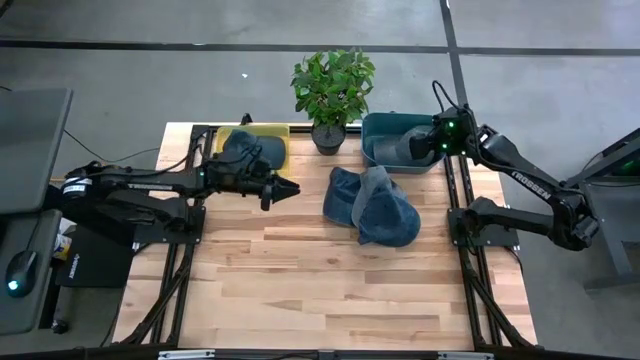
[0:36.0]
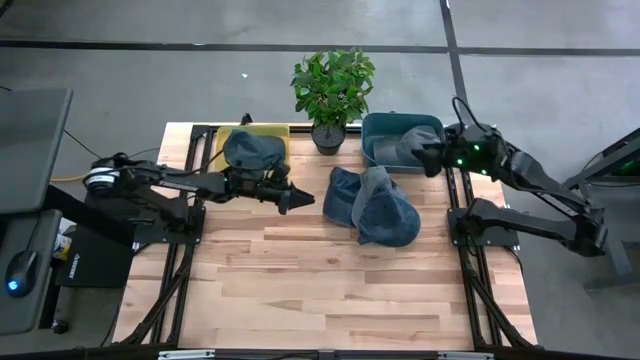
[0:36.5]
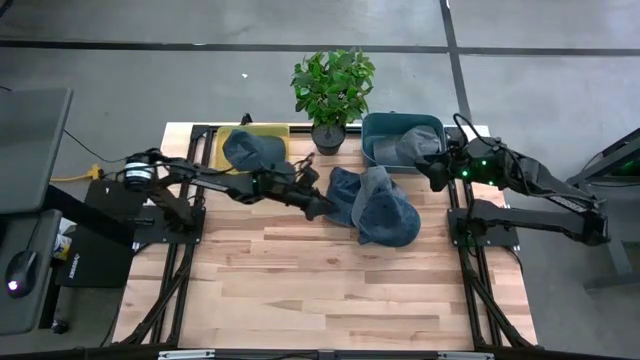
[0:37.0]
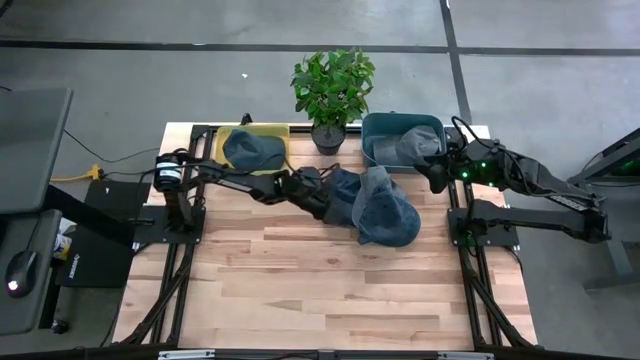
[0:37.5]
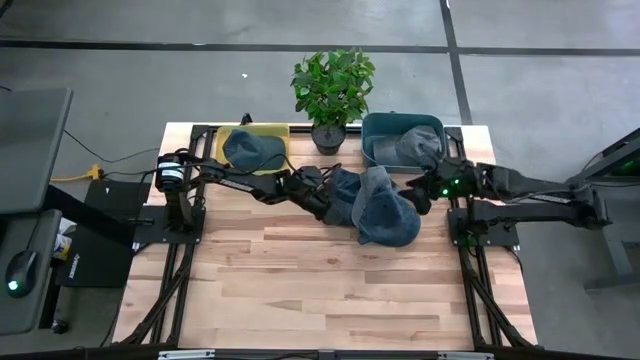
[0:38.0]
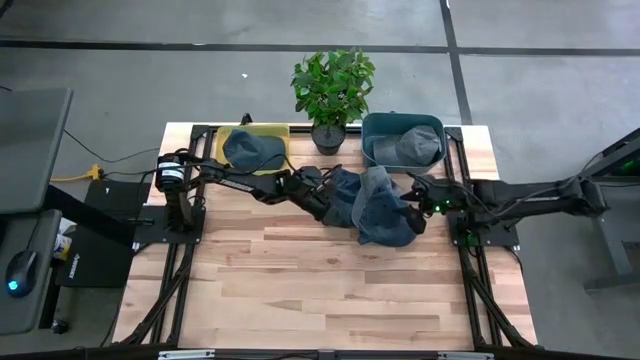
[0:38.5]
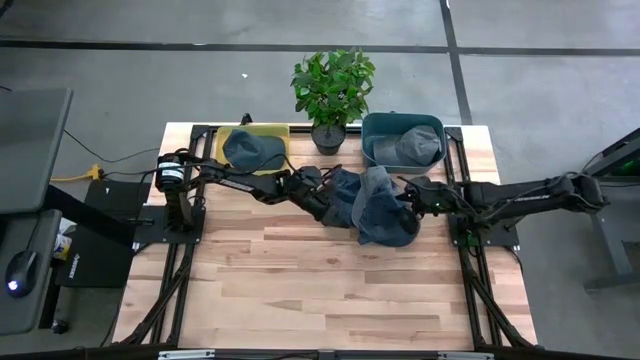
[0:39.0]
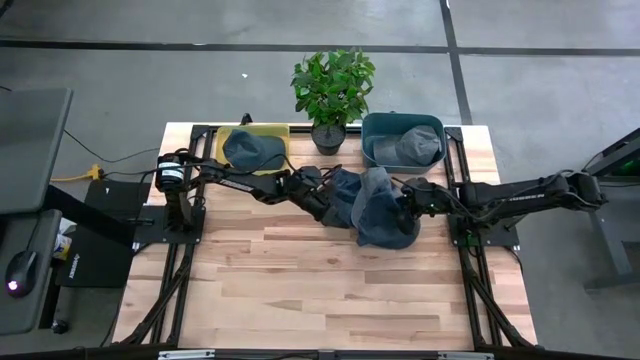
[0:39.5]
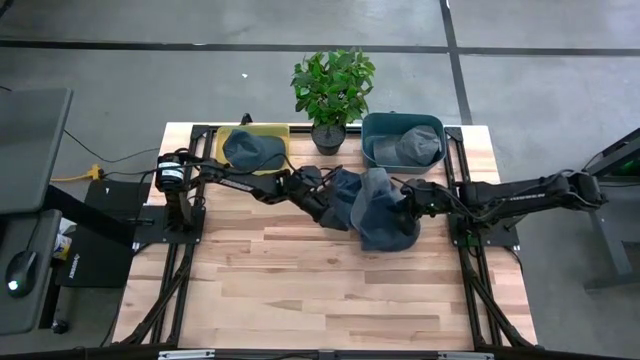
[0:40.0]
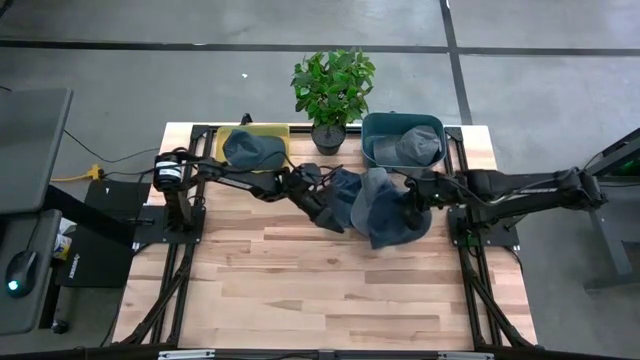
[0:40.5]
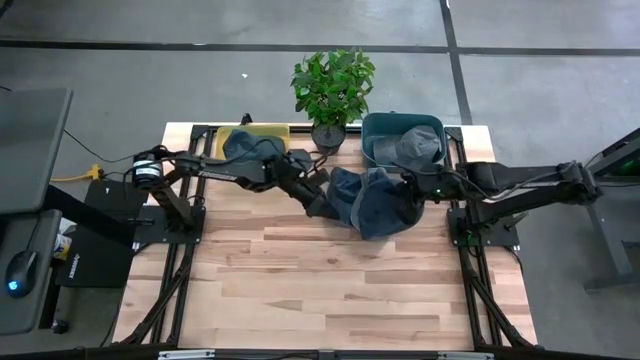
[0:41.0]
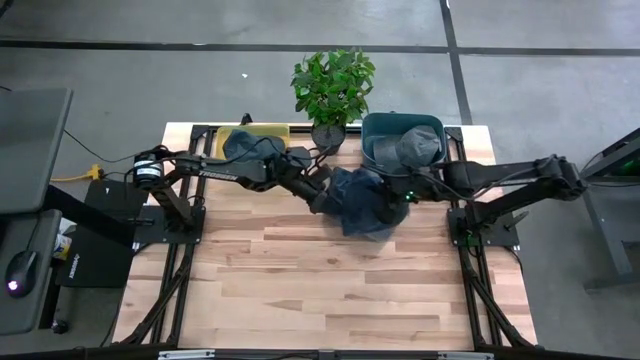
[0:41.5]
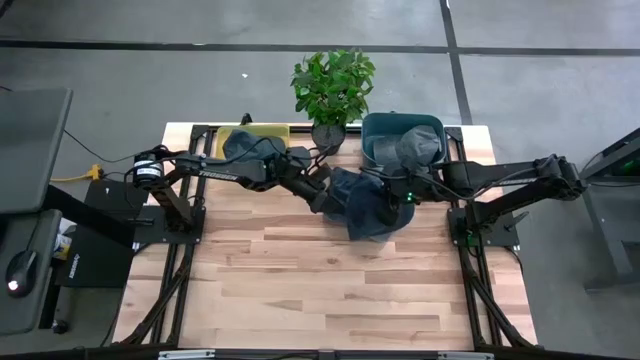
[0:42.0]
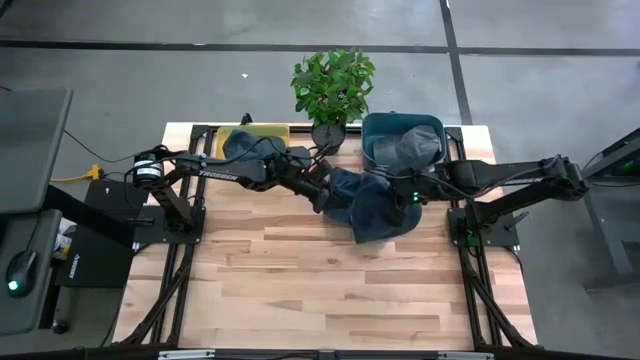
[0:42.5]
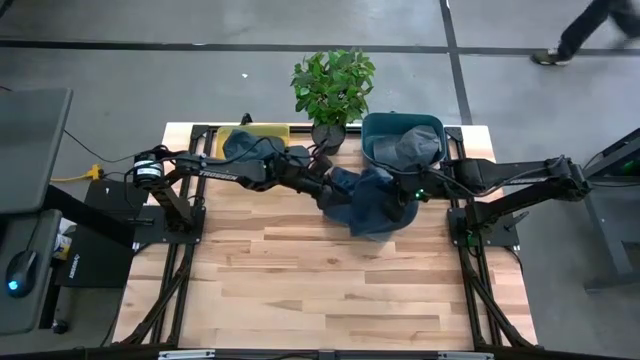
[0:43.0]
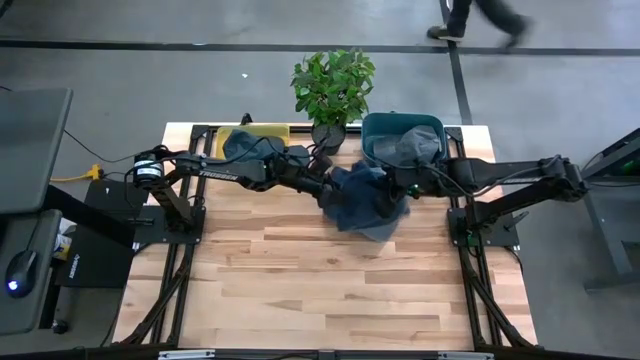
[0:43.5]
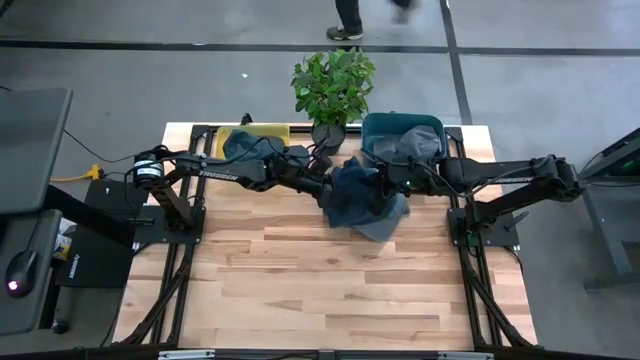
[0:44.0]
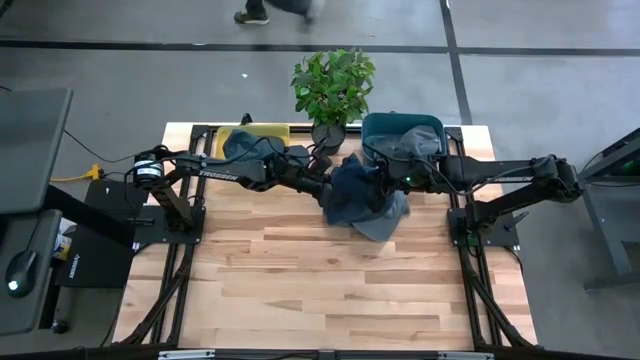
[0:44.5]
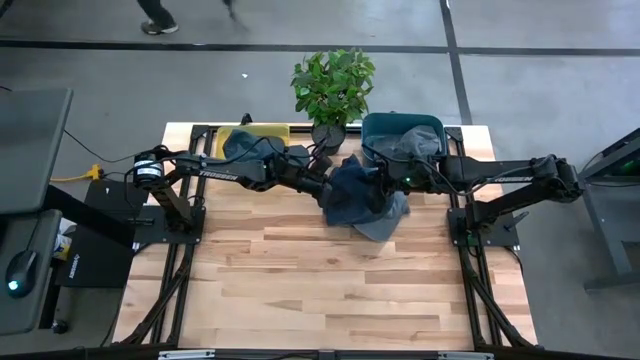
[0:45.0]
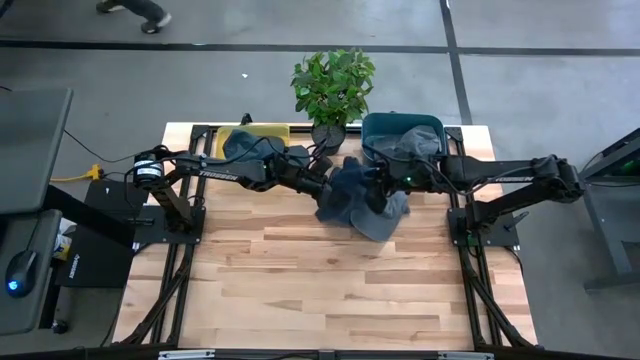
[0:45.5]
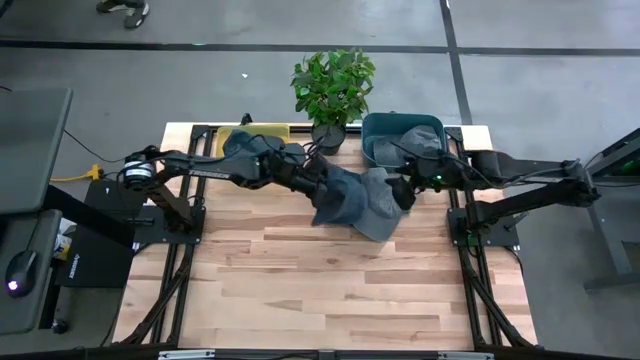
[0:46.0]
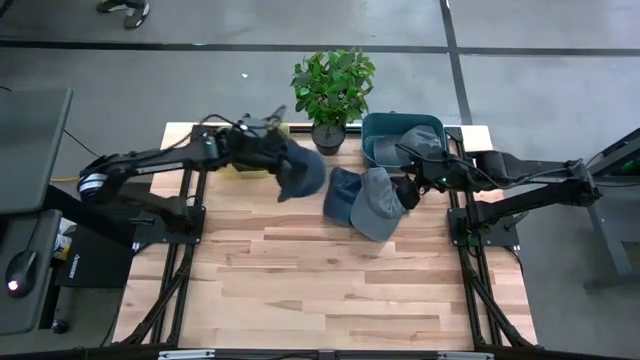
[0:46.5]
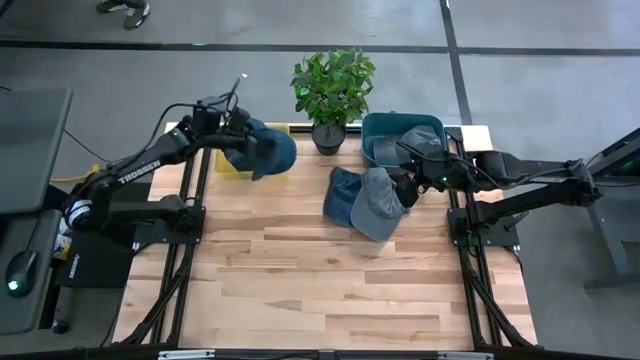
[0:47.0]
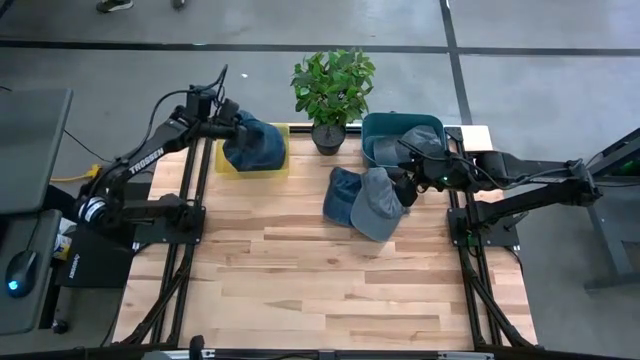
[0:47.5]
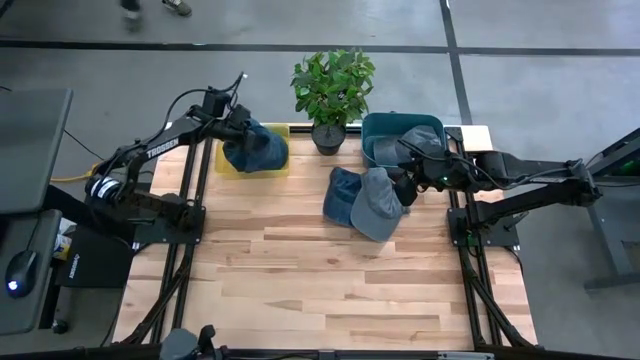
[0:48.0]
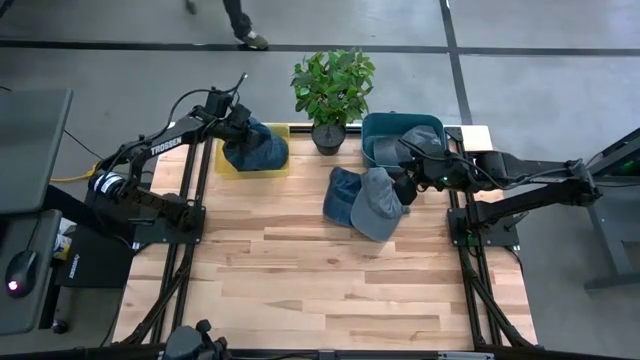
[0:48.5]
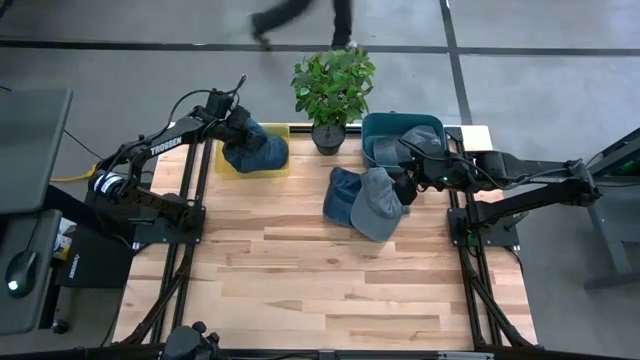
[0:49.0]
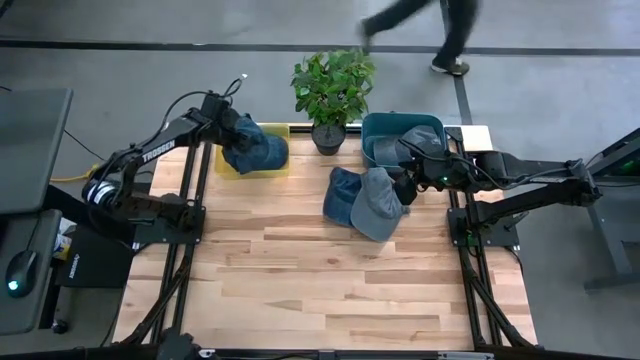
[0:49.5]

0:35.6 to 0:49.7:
Task: Pick & Place hat
Put the right black cap into the yellow bin

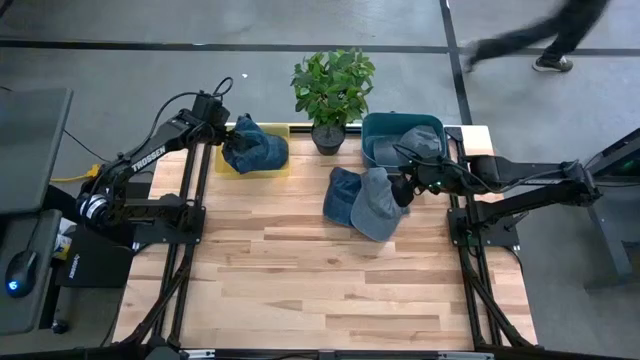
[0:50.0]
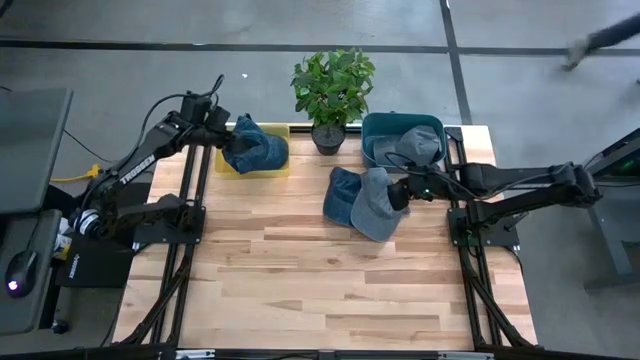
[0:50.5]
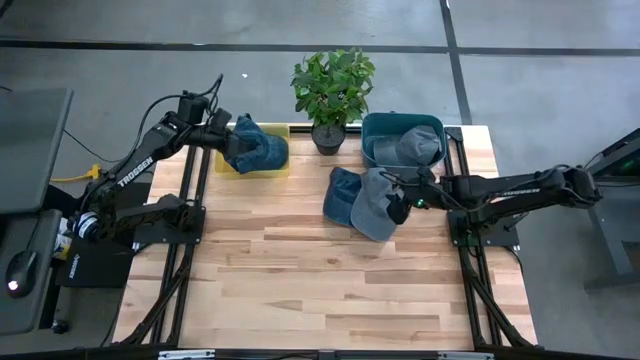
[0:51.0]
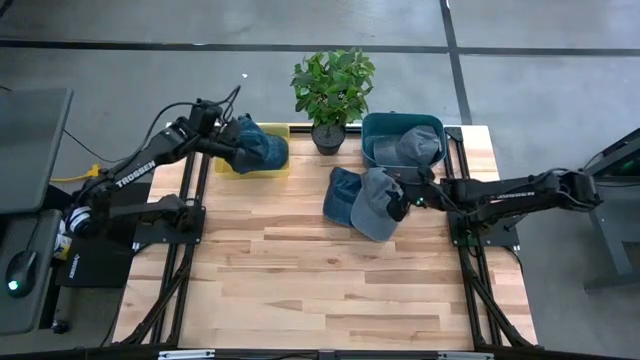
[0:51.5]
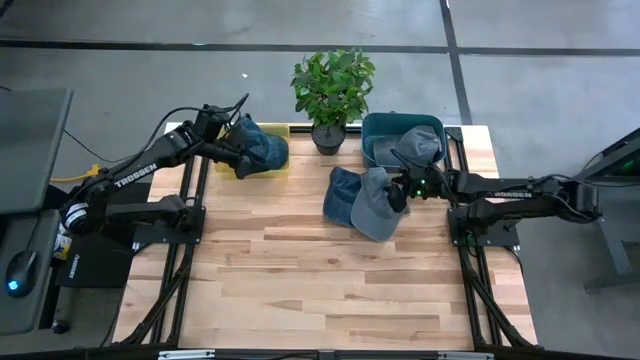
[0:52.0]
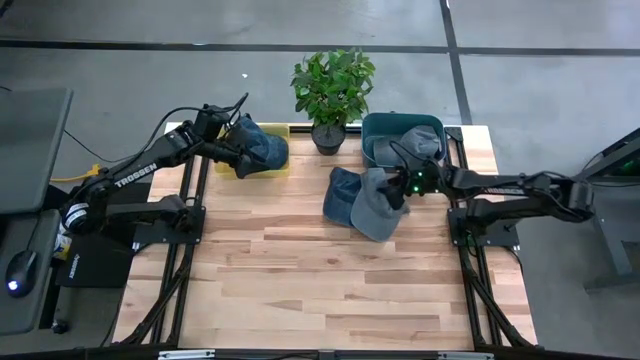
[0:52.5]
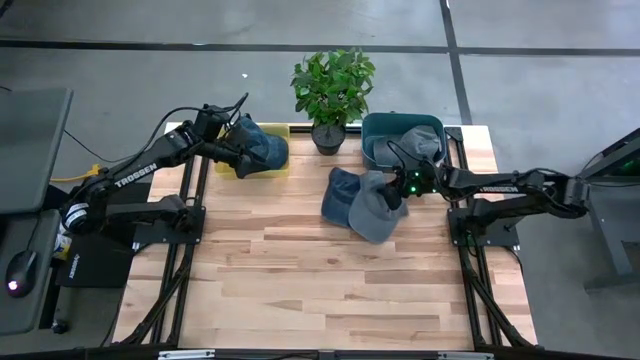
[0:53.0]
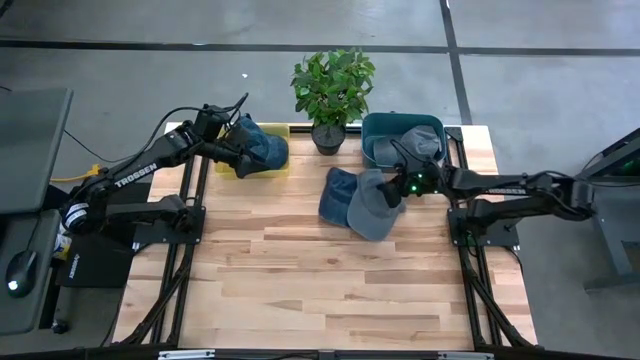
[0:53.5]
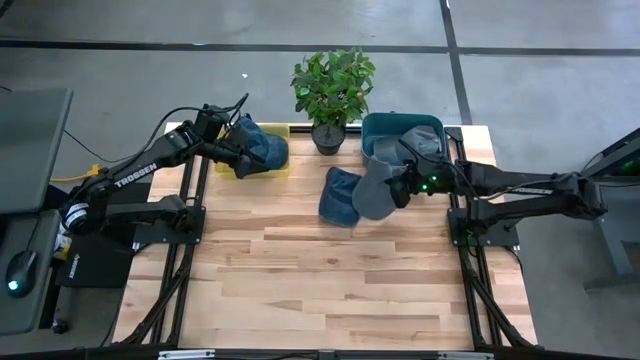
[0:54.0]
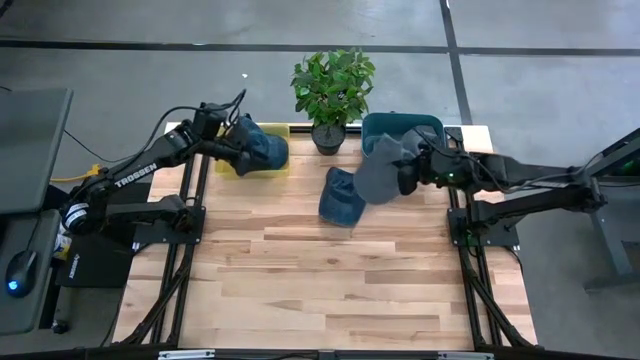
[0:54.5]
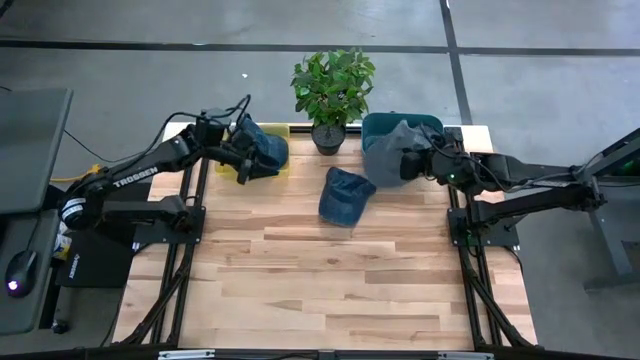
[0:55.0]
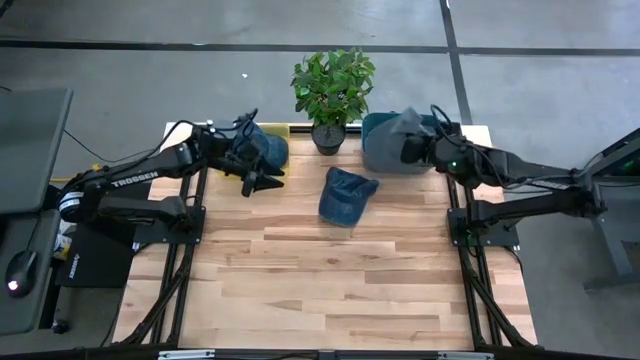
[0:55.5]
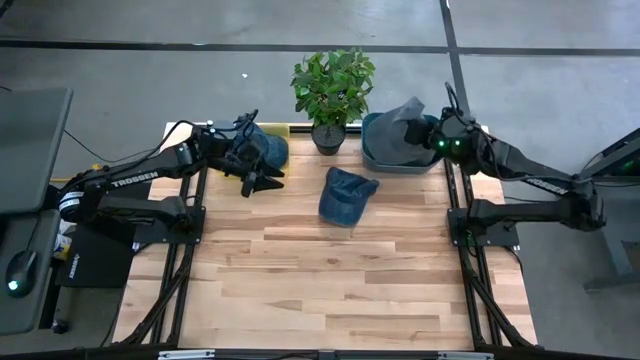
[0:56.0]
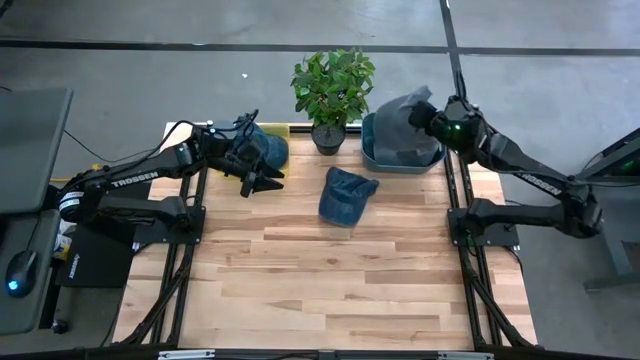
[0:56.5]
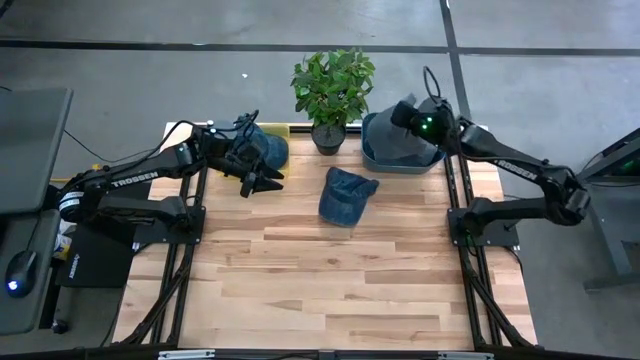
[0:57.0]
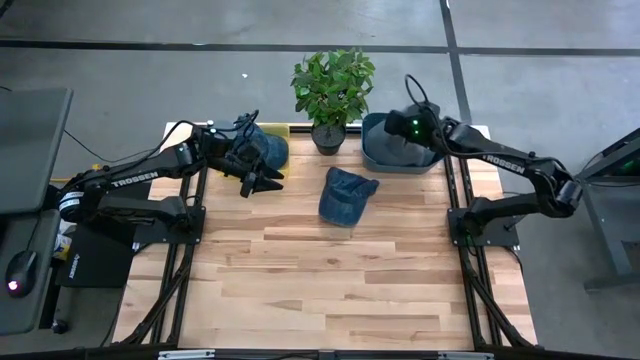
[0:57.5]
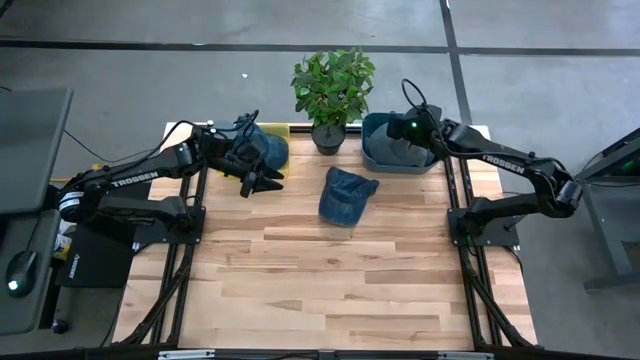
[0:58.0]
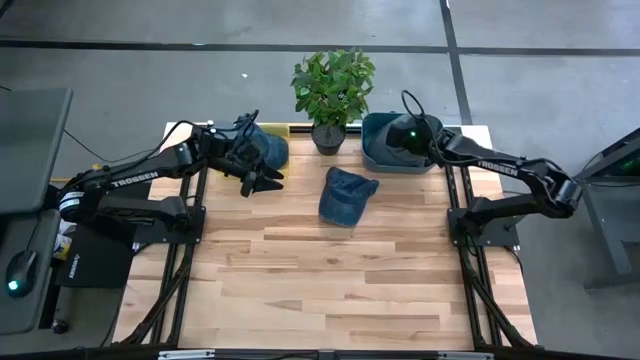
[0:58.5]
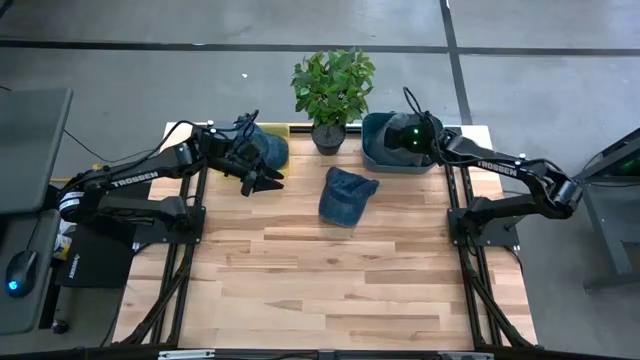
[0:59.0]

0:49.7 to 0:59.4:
Put the gray cap into the green bin
